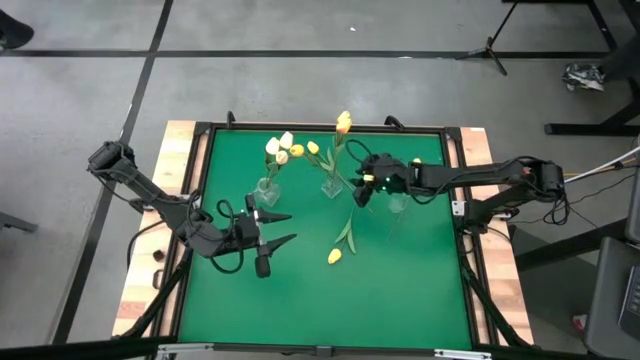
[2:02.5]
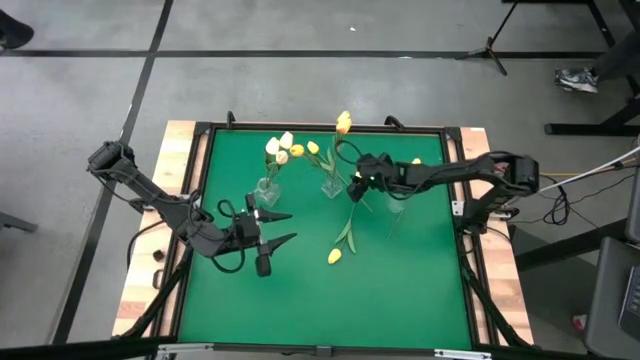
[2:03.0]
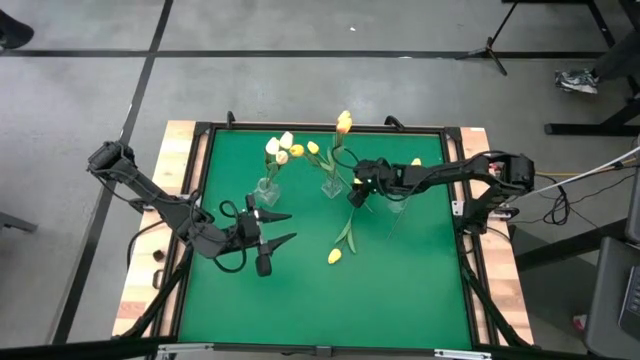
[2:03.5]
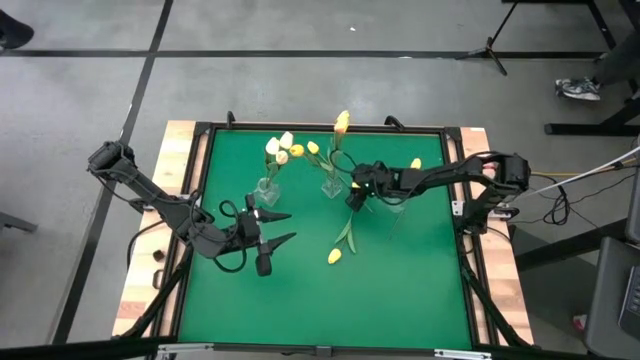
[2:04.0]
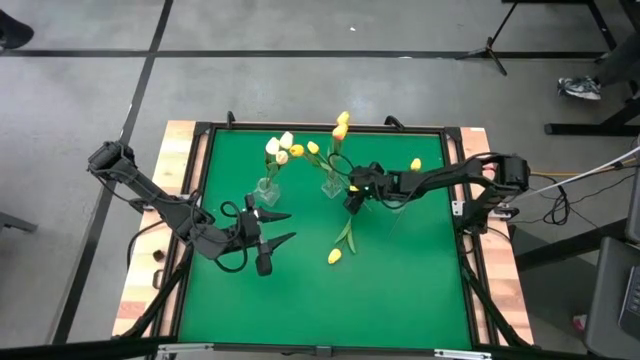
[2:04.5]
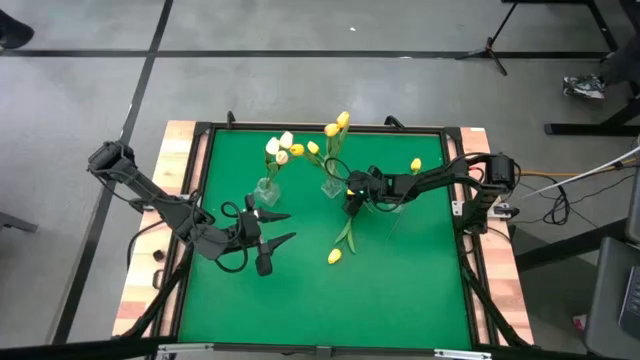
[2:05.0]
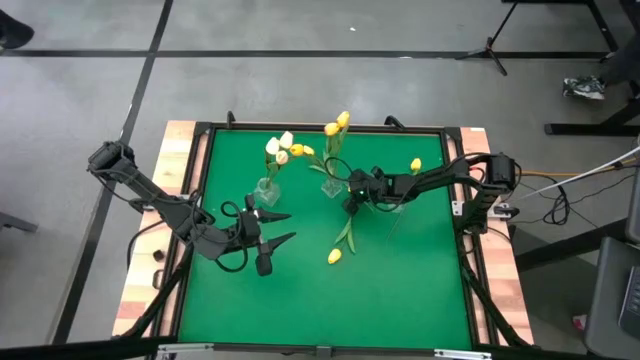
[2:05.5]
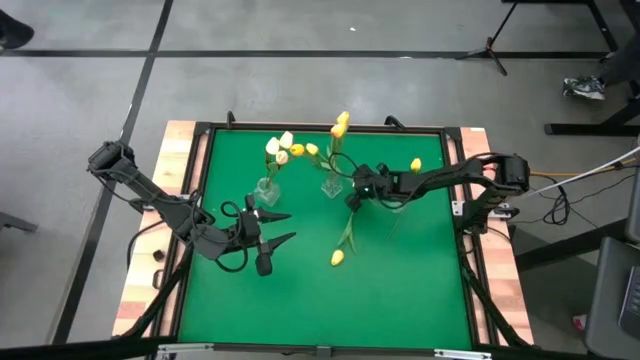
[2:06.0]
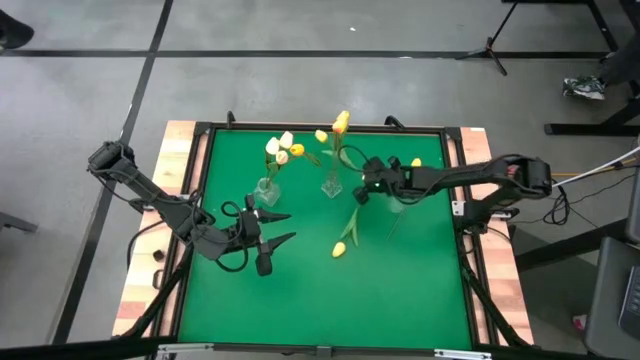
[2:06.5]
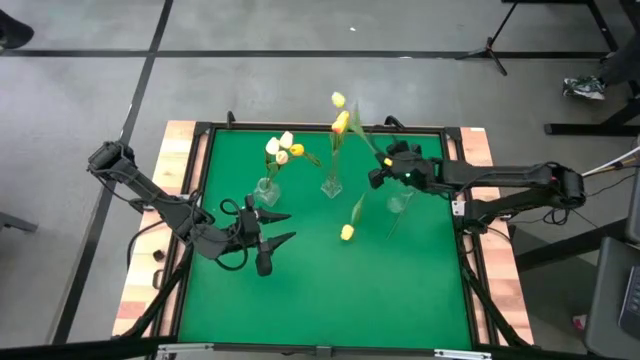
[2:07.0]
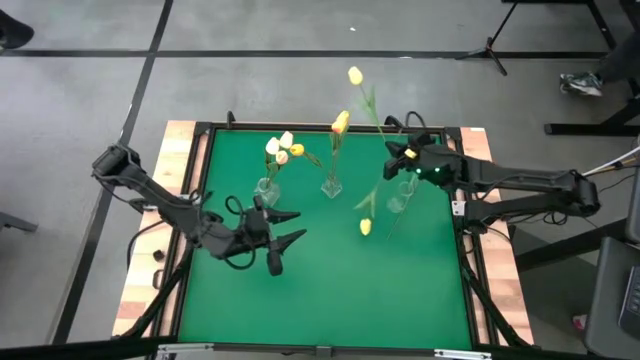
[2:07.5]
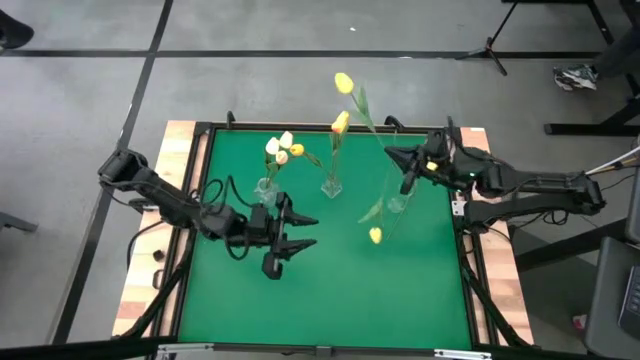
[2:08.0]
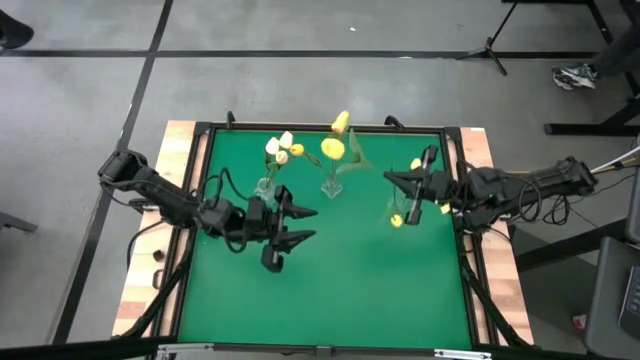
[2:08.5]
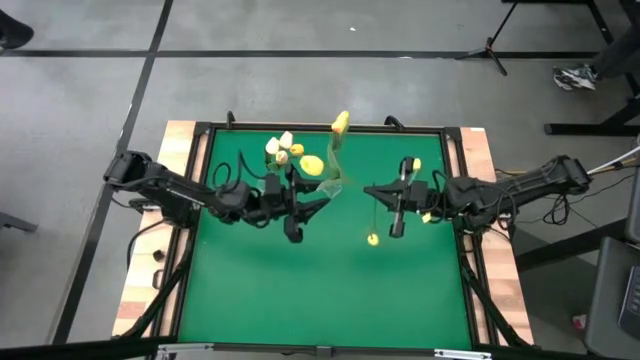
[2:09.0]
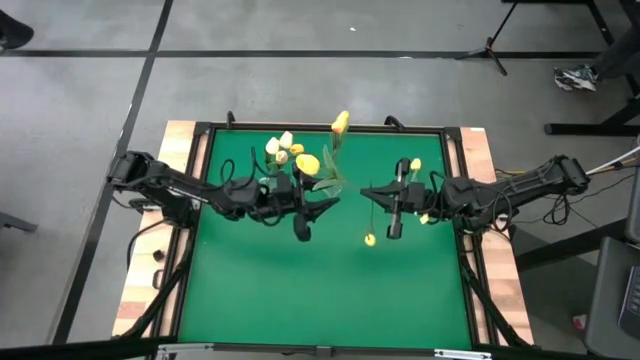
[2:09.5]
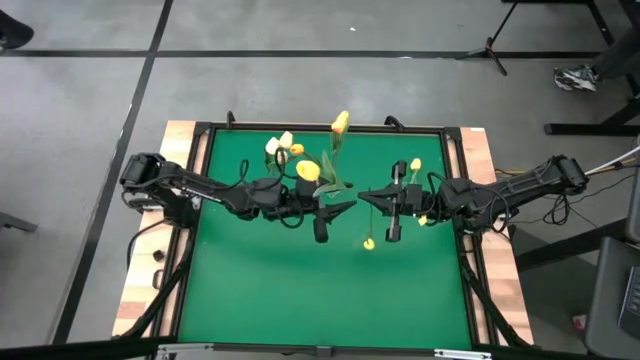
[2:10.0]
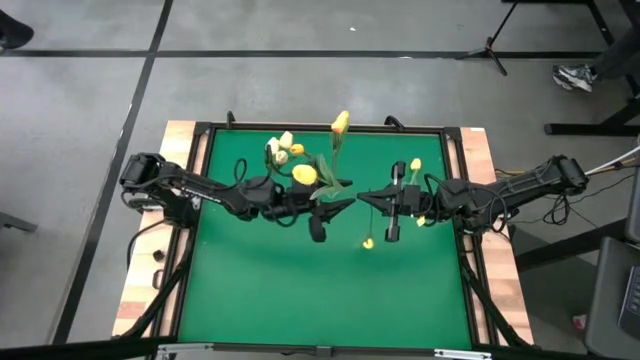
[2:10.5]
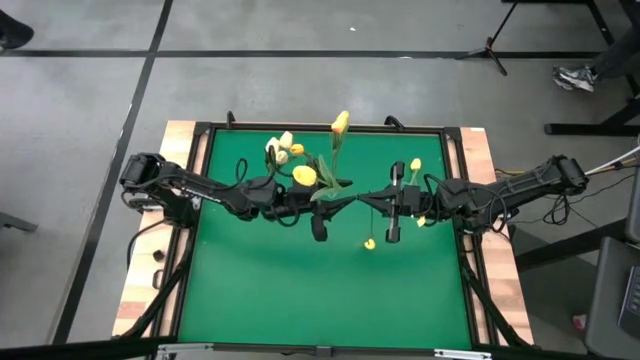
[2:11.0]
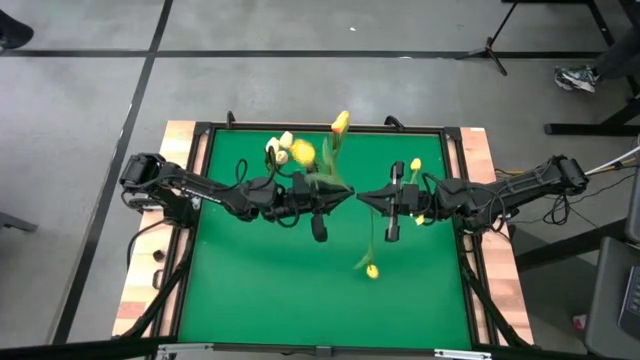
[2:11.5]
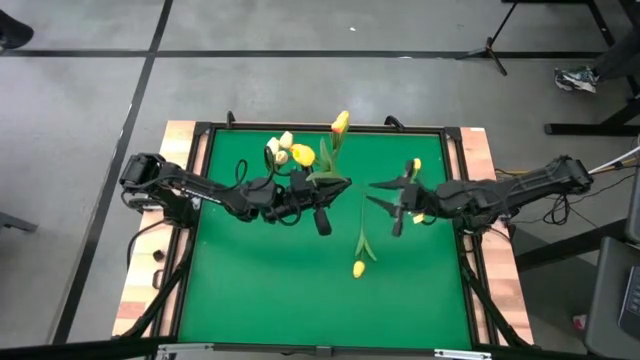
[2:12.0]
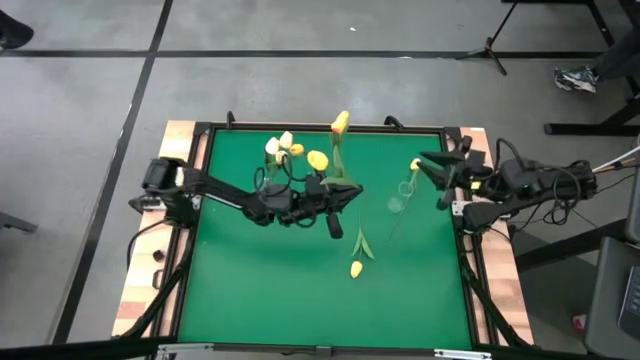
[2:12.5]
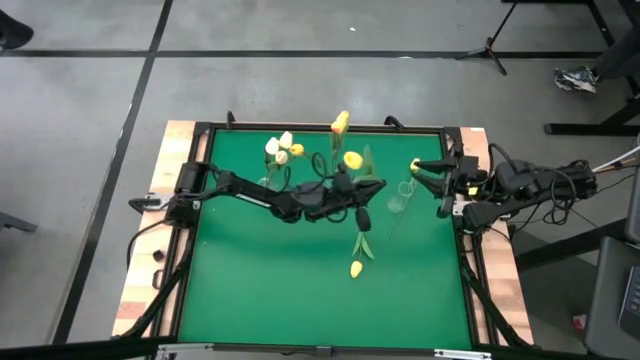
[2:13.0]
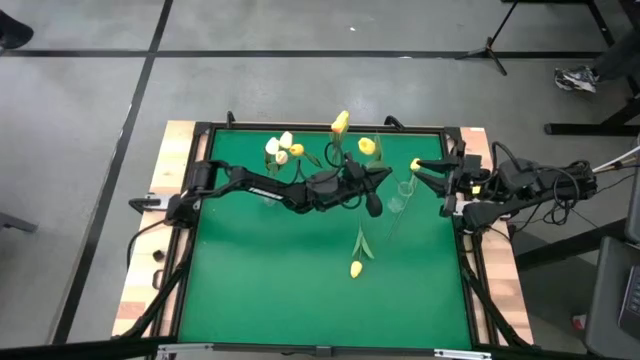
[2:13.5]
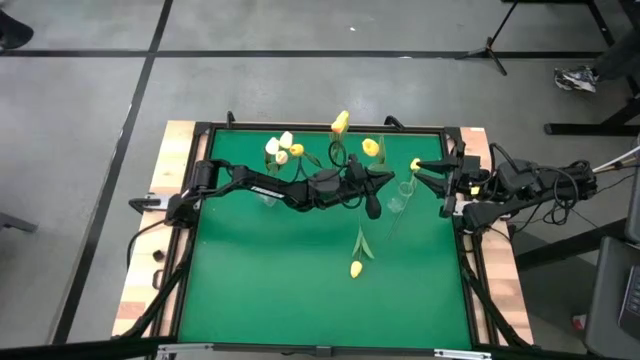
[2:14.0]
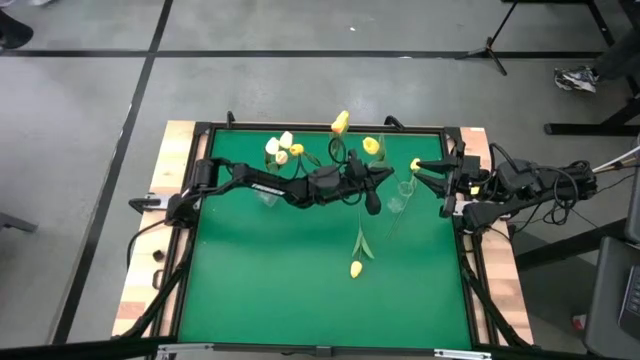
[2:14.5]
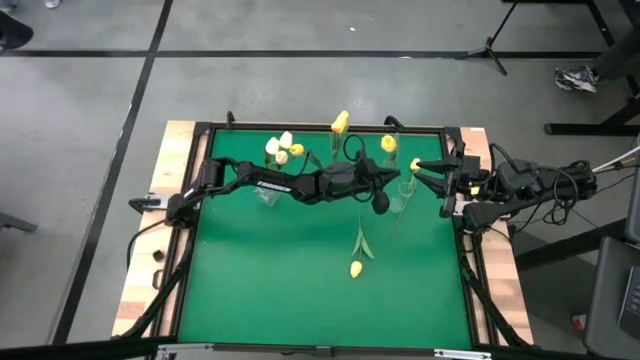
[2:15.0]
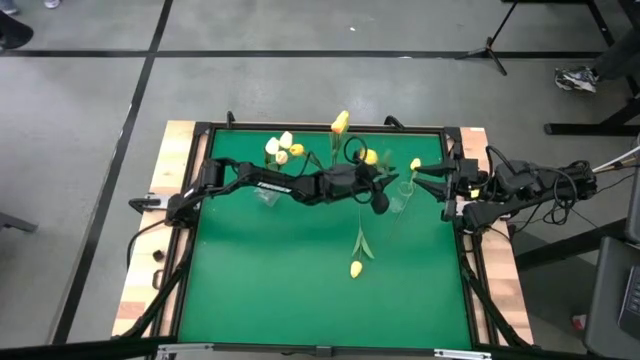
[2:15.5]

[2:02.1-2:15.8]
Task: Sort flowers into vase by color
Put the top left yellow flower into the right transparent vase

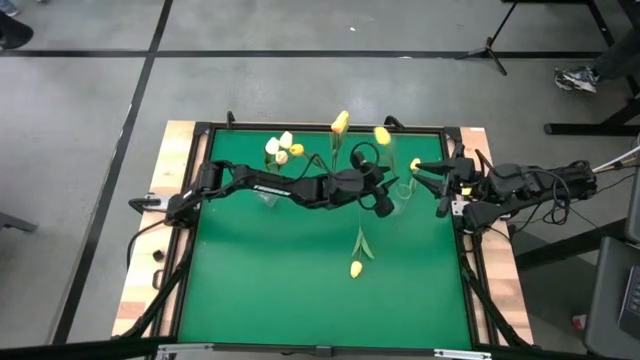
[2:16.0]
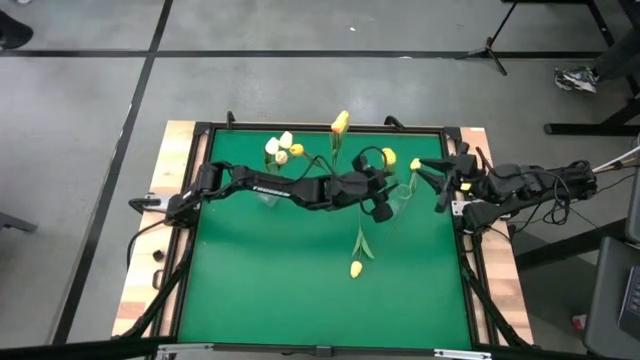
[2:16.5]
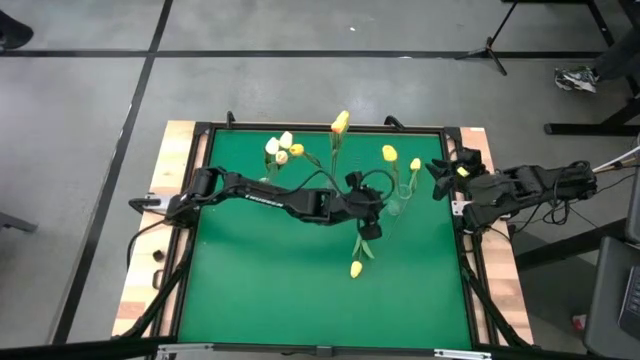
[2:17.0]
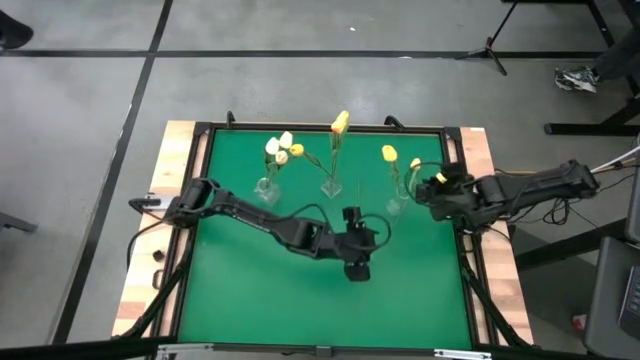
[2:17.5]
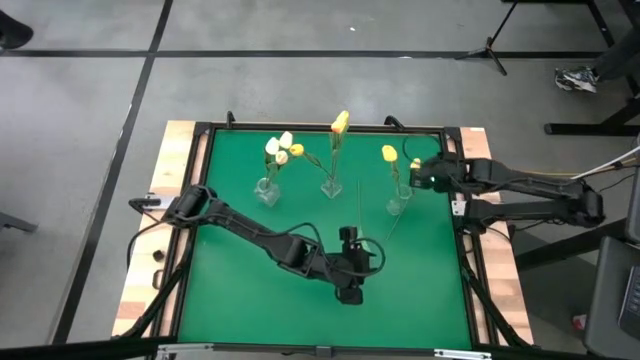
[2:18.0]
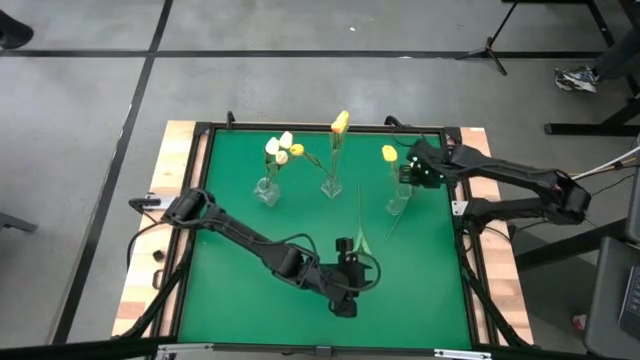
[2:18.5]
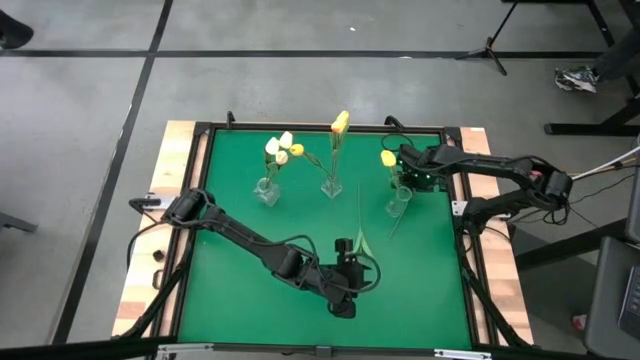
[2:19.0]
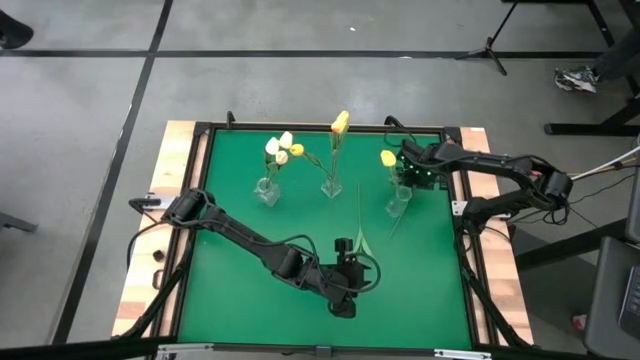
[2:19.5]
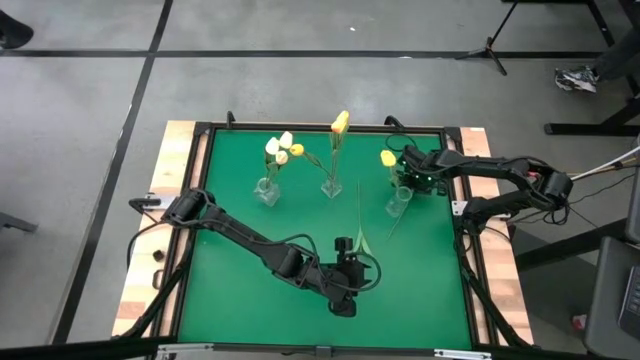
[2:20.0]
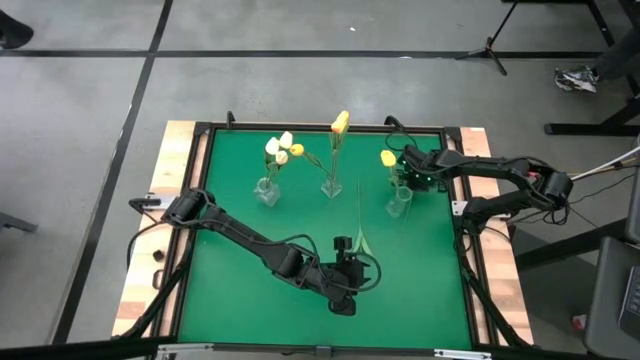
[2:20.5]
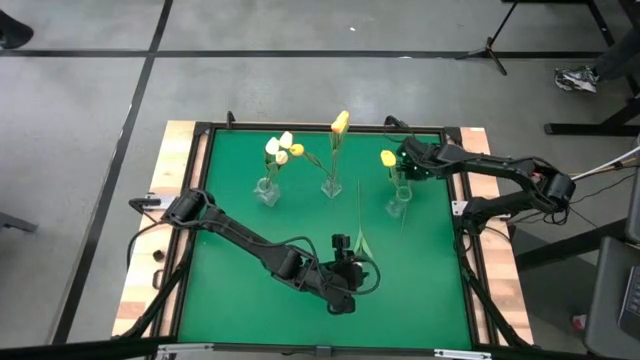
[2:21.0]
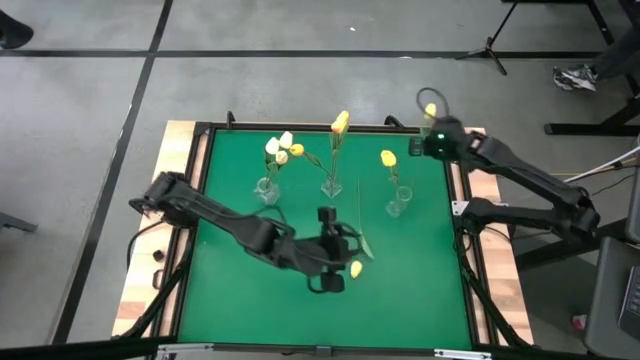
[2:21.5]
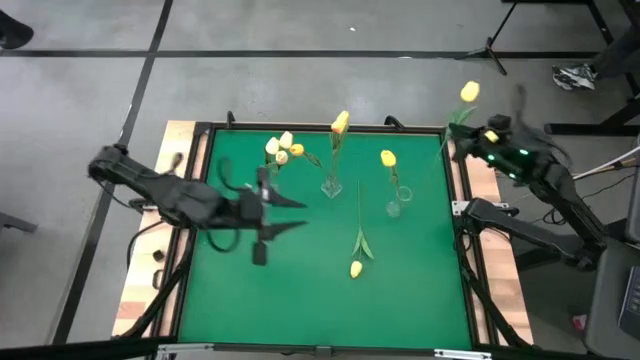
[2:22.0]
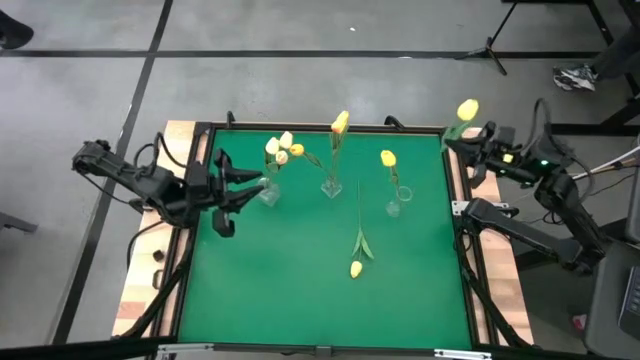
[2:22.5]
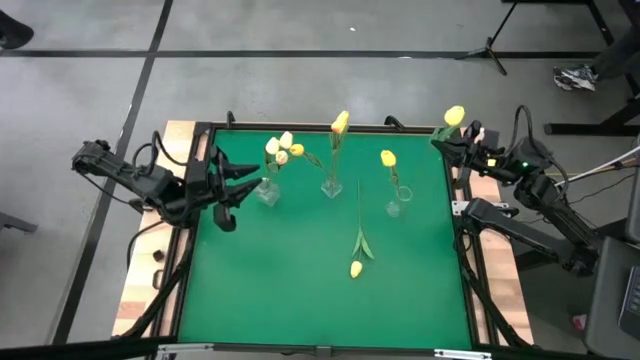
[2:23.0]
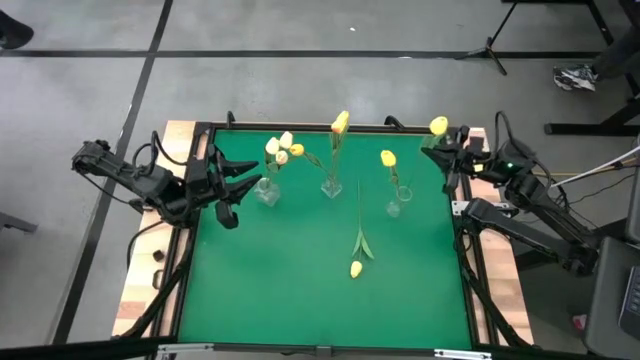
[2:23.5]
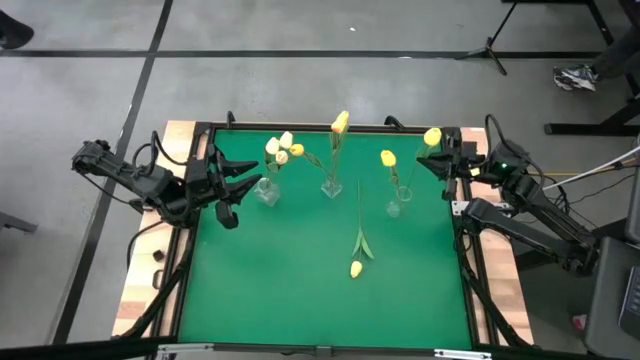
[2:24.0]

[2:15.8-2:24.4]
Put the top yellow flower into the right transparent vase
